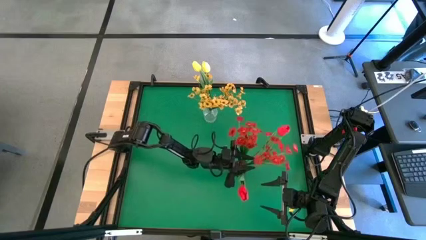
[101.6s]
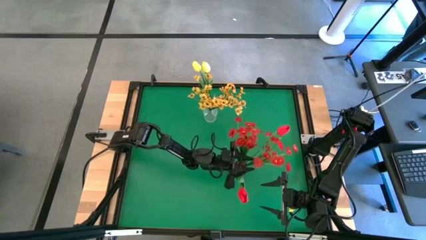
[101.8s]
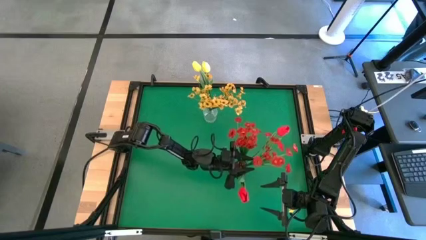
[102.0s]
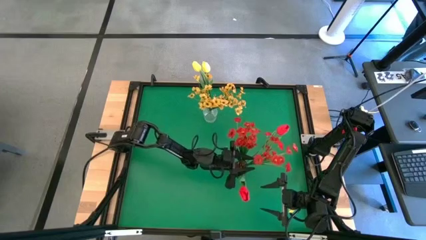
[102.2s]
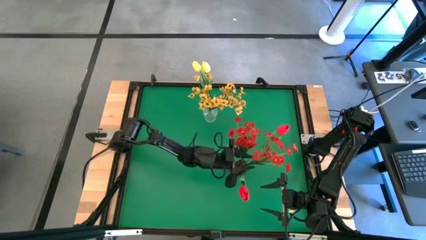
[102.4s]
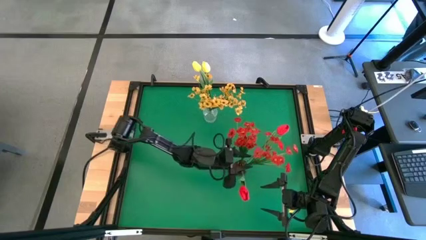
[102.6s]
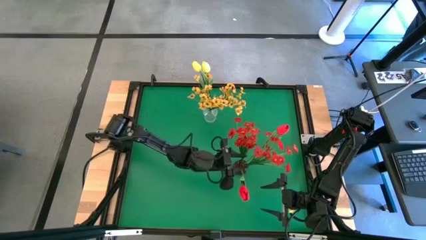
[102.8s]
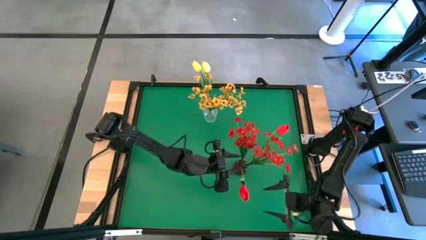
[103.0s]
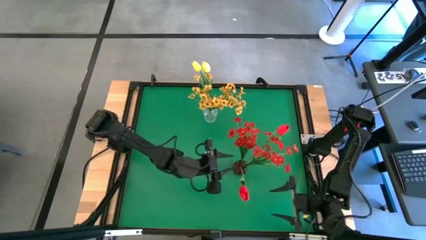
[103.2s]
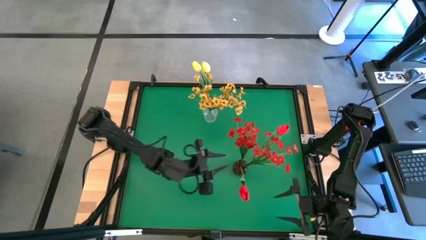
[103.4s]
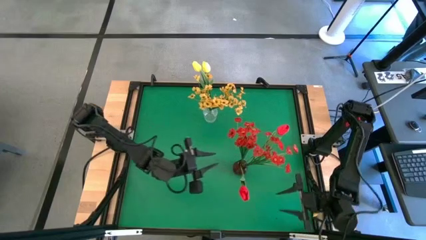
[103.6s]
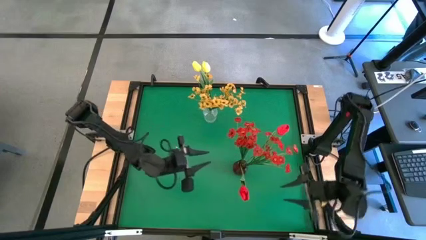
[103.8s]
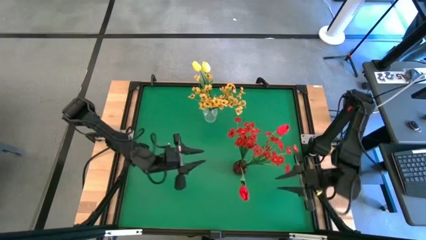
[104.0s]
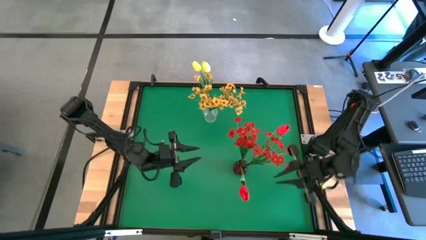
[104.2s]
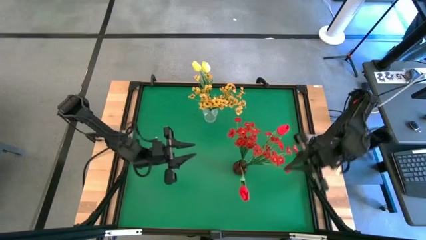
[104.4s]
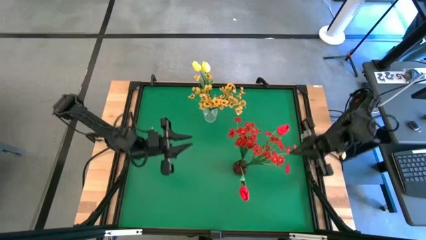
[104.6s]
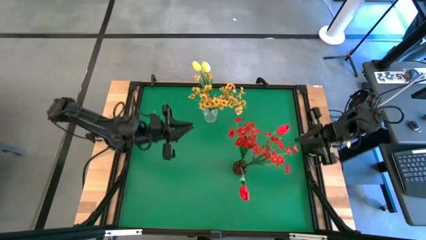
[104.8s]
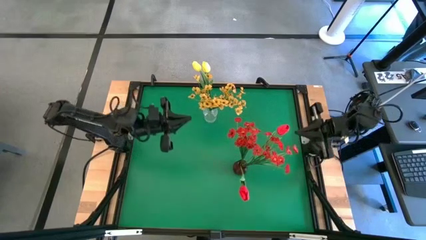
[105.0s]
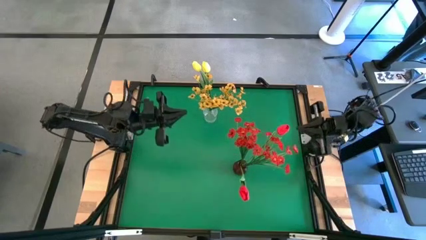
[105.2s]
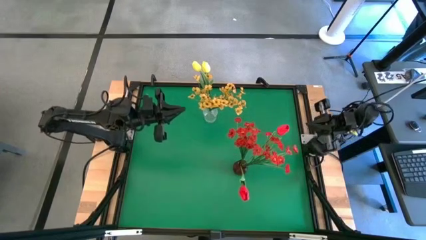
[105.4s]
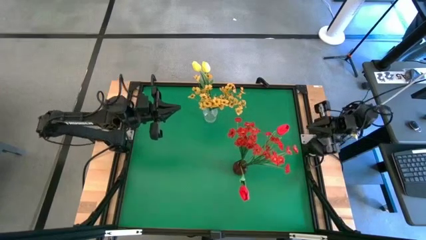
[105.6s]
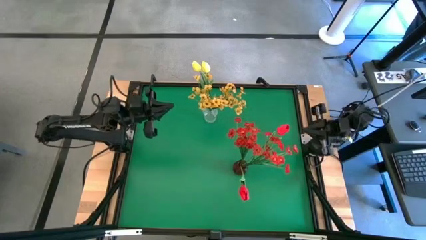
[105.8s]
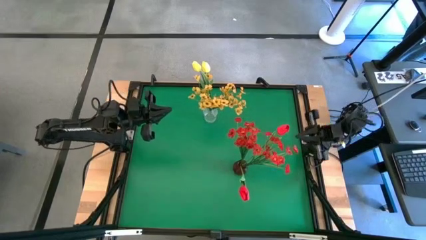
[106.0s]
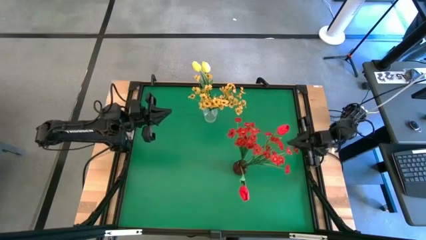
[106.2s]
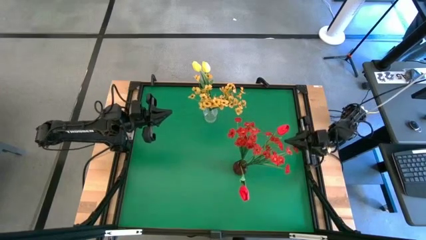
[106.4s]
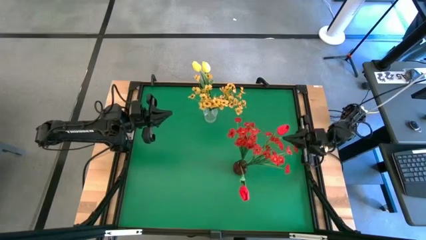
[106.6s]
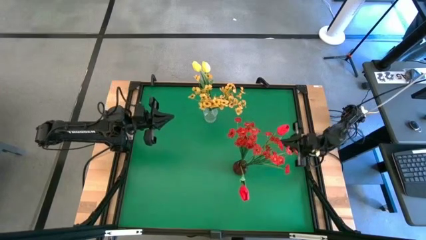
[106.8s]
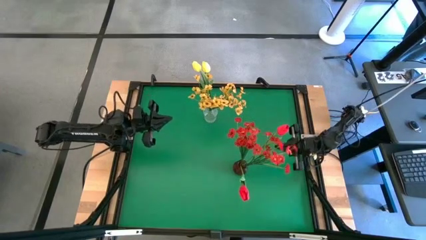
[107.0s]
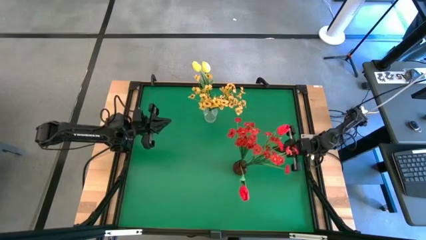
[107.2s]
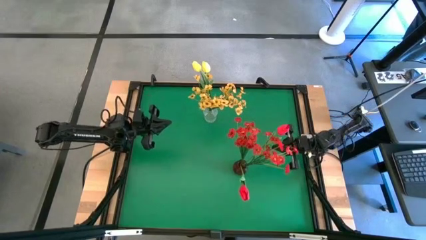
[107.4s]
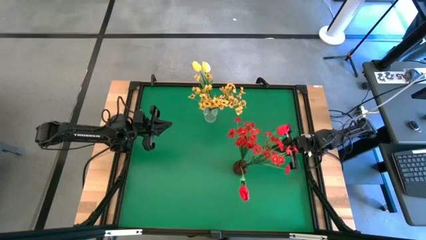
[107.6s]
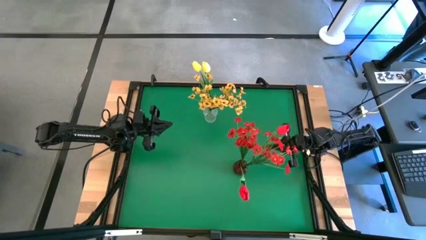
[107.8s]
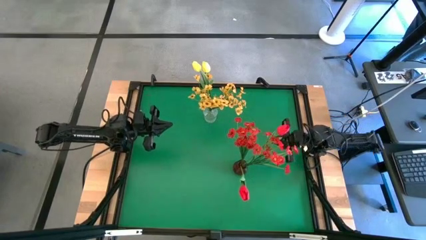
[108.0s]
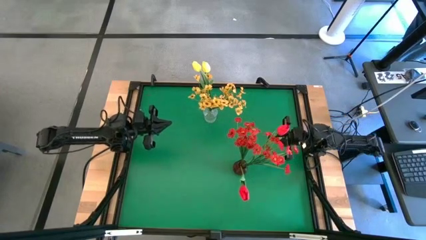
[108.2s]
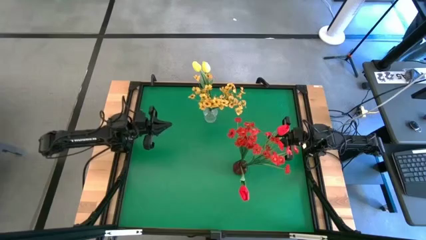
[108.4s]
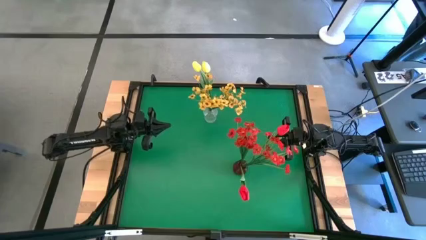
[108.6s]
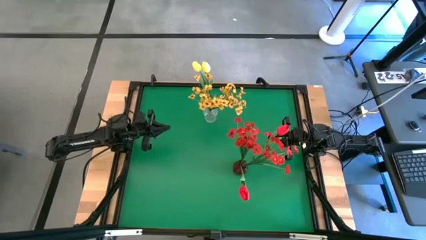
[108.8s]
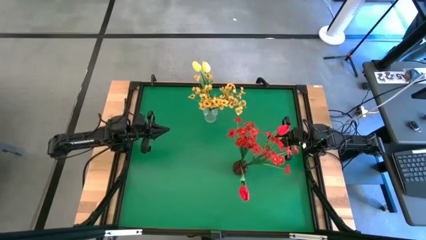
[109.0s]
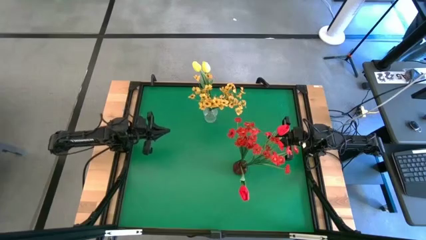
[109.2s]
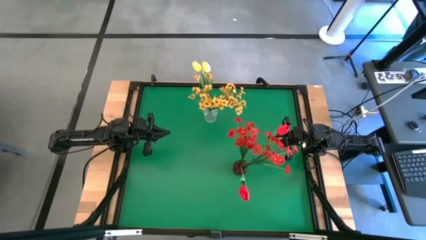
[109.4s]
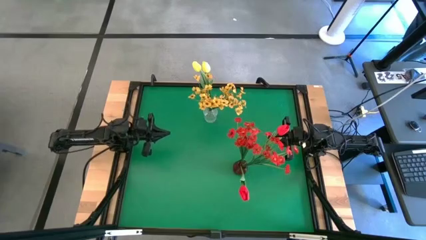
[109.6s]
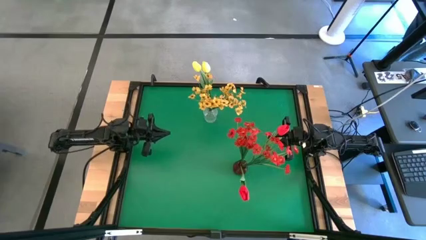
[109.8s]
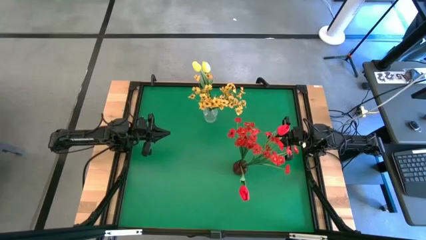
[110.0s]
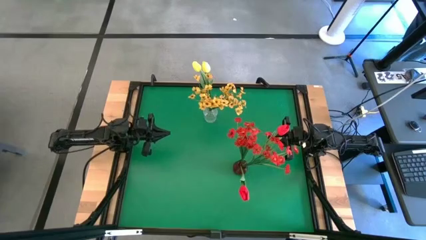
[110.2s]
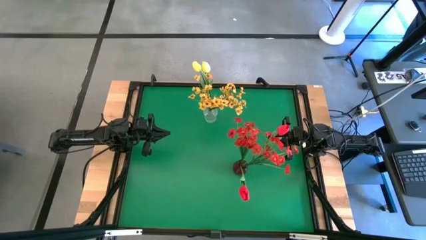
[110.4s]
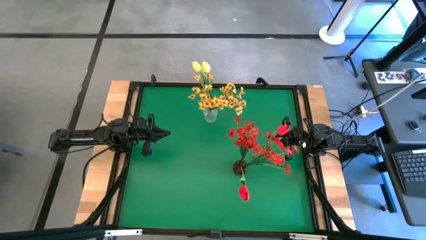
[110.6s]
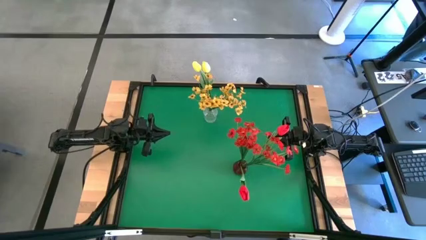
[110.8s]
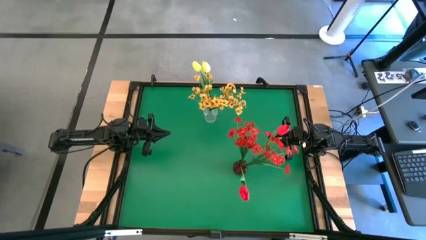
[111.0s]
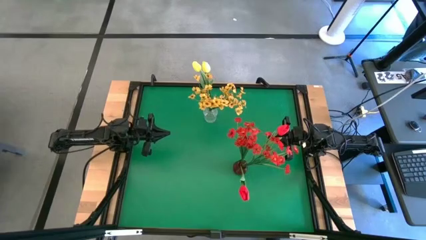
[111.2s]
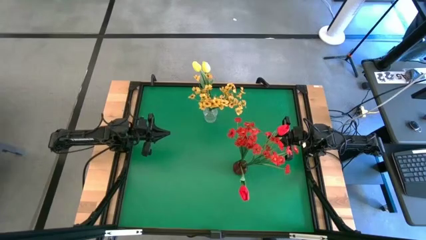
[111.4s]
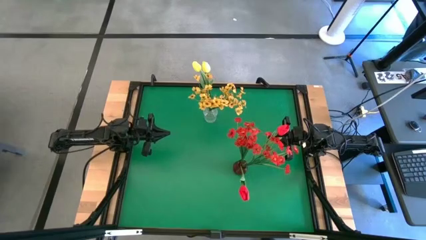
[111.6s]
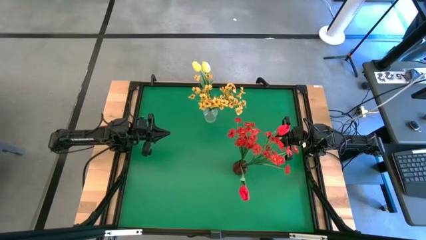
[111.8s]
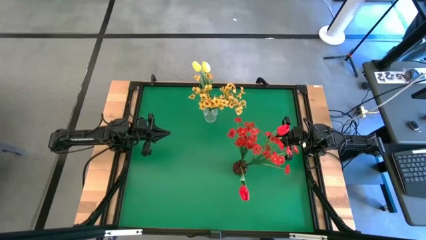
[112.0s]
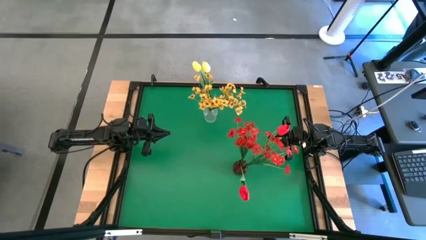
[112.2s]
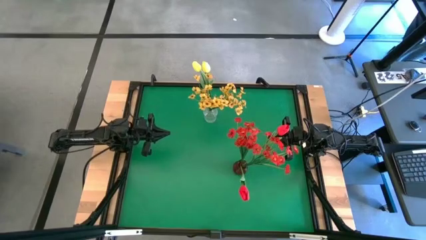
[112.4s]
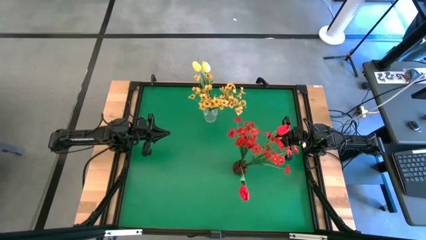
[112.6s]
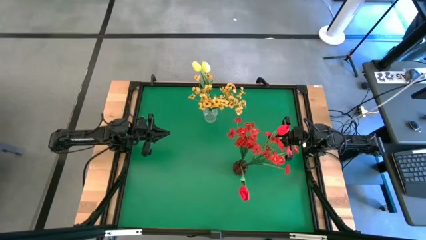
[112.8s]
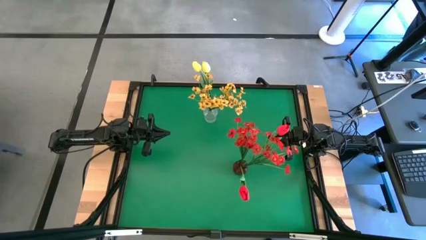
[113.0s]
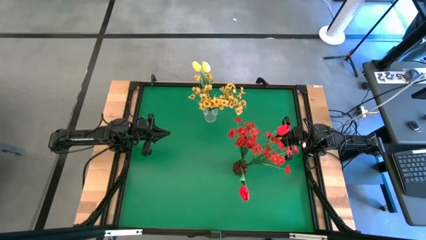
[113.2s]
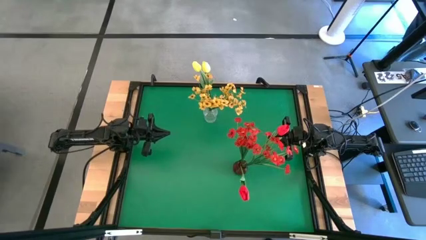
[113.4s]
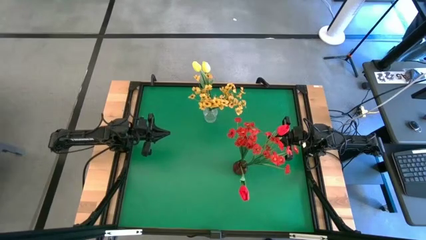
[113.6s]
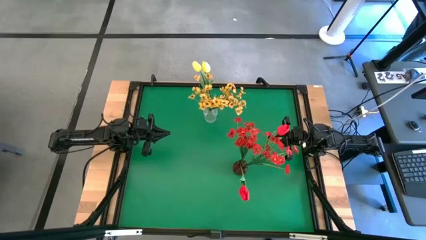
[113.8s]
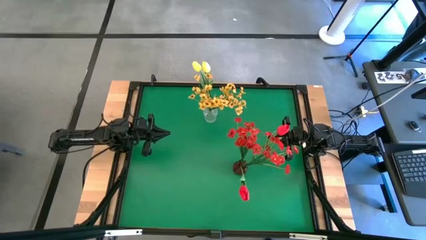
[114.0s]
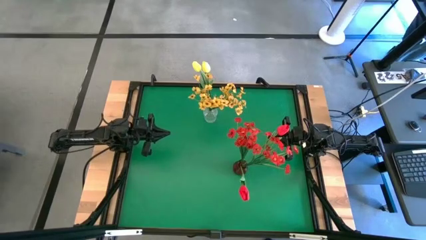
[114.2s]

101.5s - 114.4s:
Task: Sort flowers into vase by color
Return to Home Position
